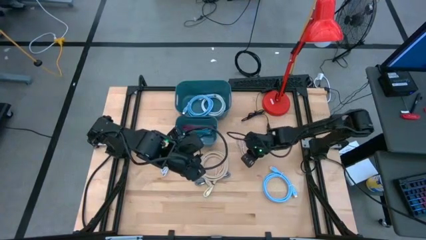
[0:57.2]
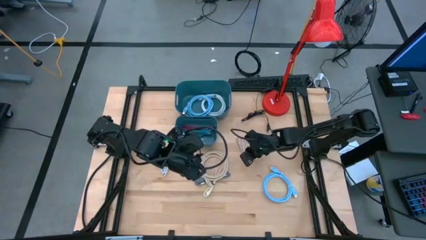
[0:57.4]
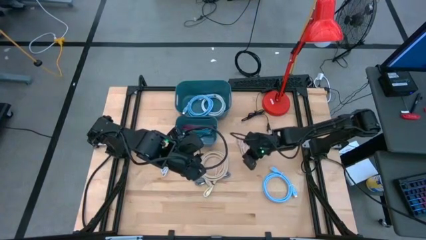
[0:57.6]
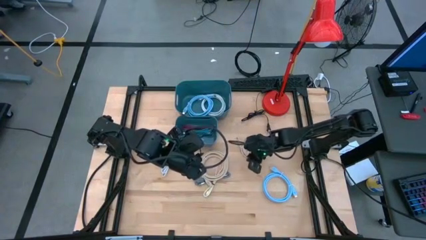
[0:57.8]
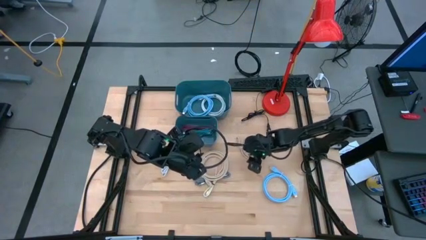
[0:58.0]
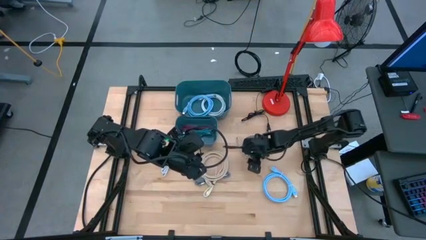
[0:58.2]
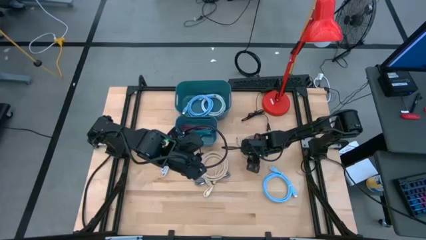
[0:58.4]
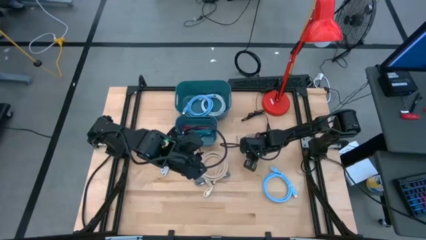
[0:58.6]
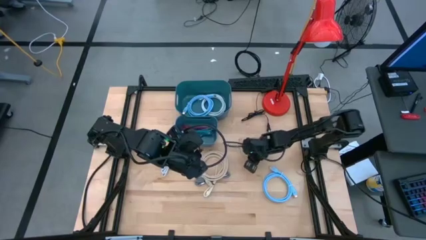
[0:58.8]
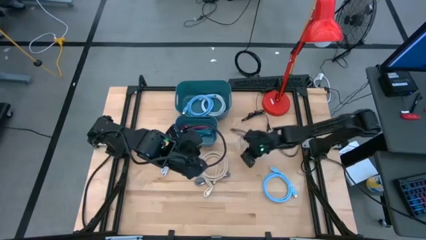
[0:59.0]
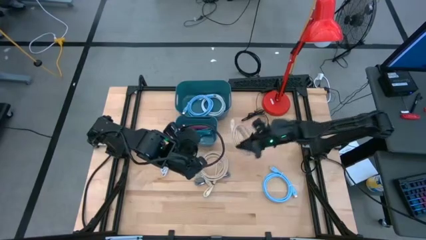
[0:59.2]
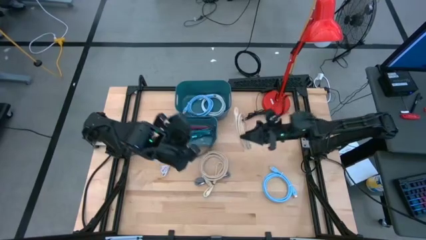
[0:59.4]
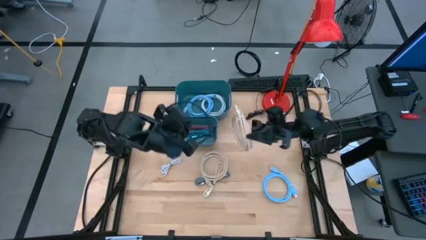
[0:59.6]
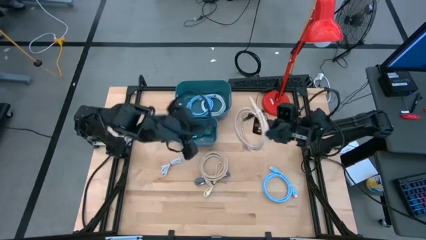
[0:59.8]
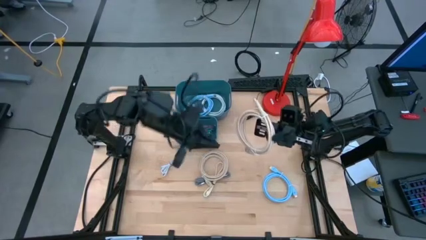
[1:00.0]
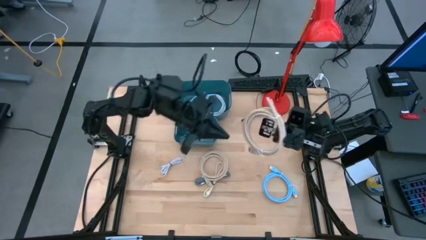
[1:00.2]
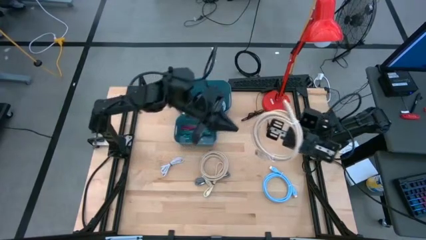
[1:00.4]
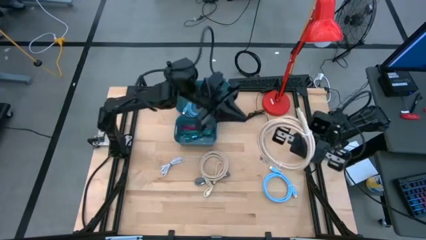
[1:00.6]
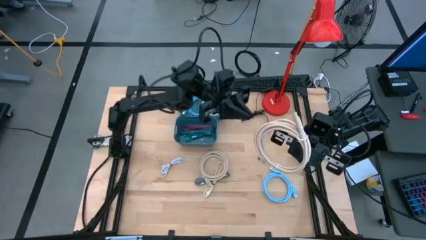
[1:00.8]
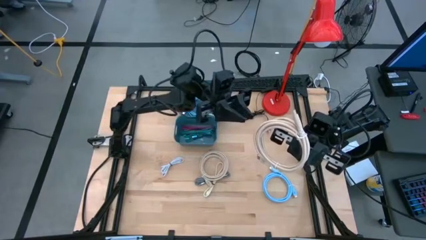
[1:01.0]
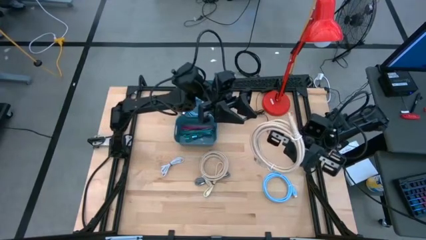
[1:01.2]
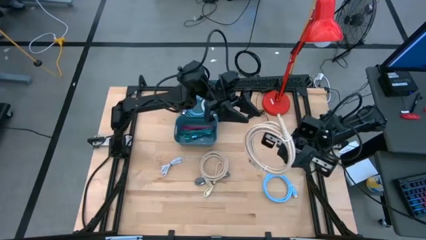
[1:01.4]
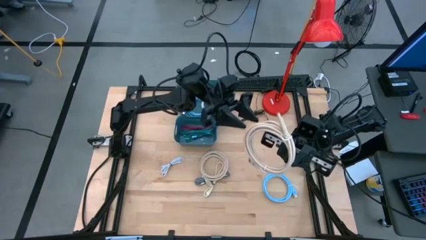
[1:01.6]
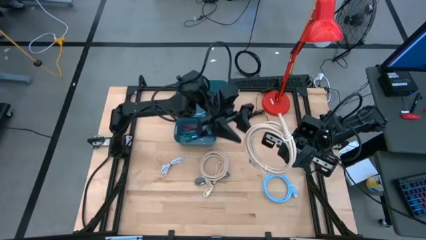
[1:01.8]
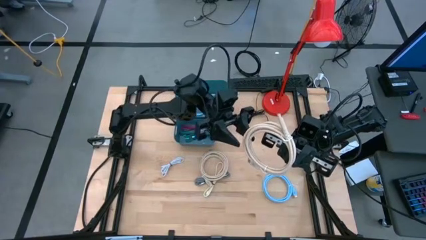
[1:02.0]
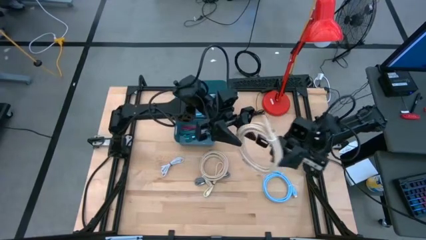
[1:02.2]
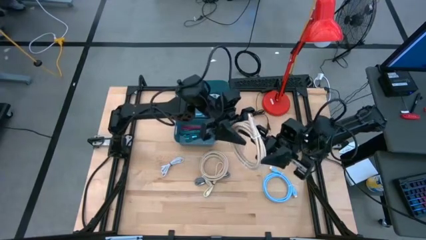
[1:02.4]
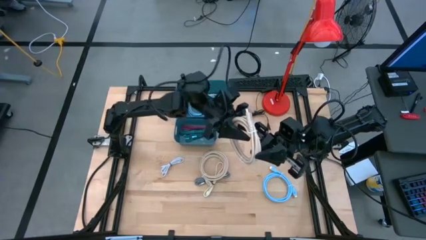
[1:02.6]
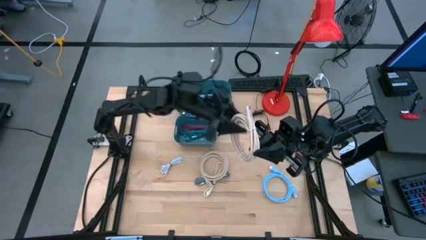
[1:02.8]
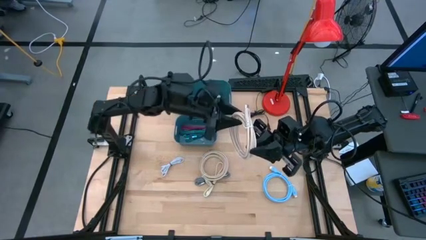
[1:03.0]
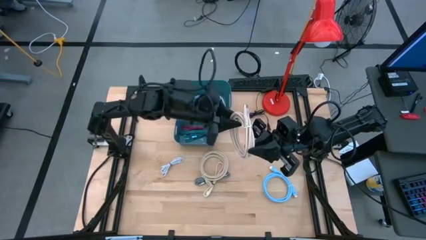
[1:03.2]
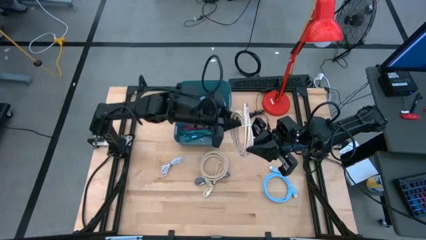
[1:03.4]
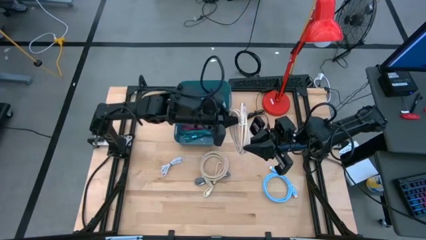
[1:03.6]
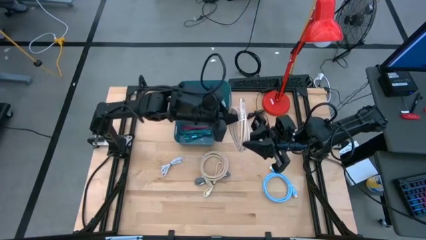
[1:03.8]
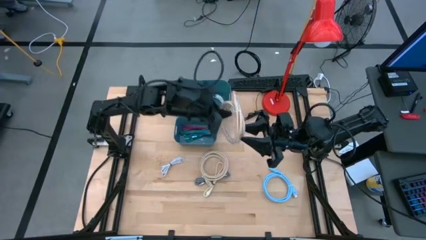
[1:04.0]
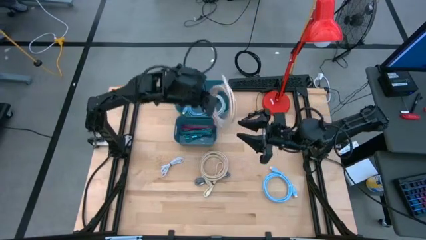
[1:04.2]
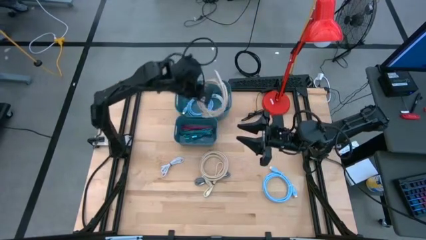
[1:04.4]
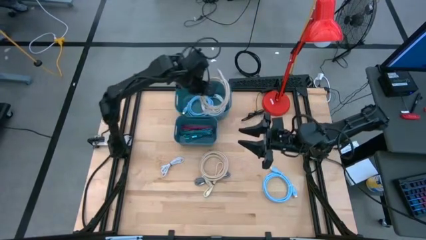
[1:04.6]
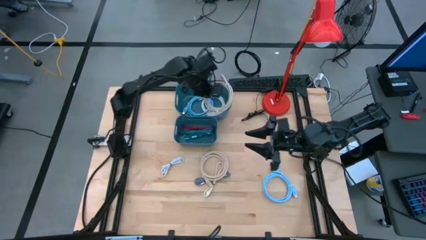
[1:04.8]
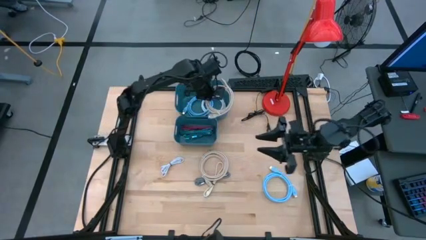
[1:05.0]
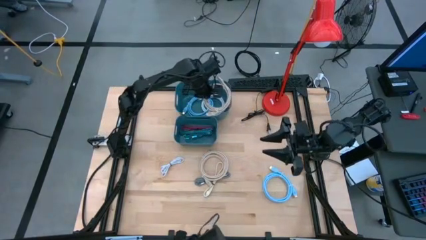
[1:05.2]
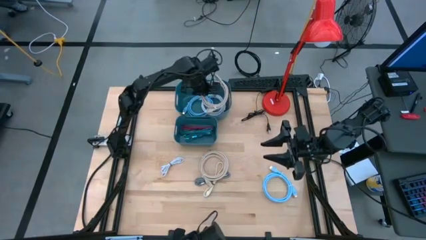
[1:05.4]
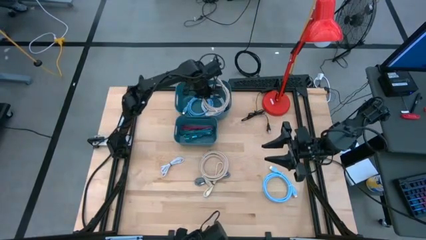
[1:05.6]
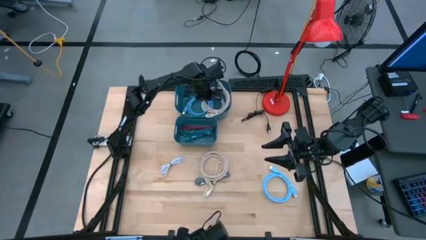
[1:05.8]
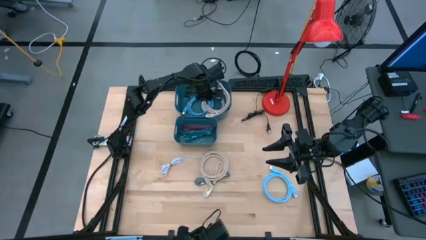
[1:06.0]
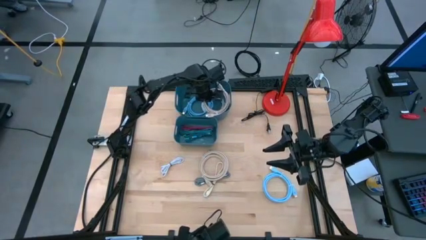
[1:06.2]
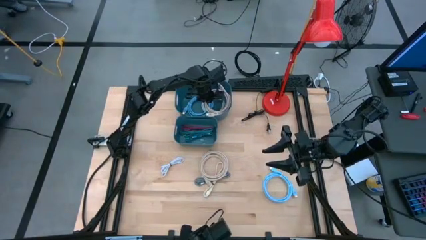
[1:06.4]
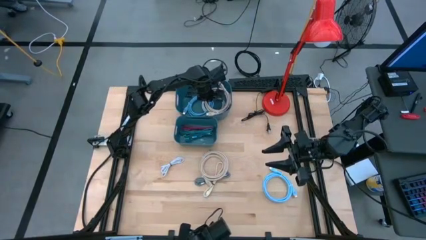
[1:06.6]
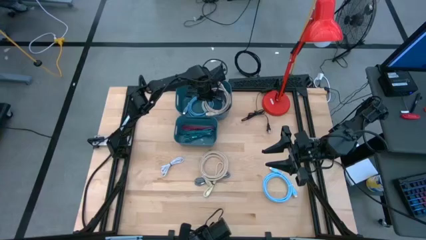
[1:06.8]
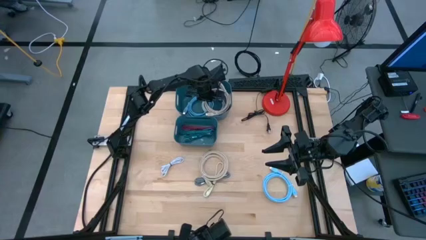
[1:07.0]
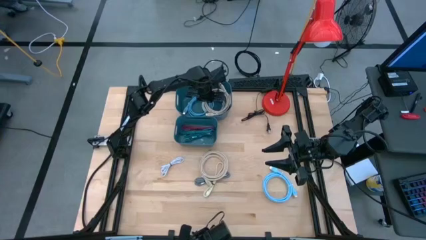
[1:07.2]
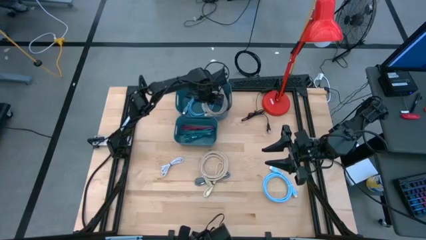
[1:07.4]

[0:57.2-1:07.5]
Task: Pick & Place USB Port
Put the top brown HDMI cable into the top blue bin

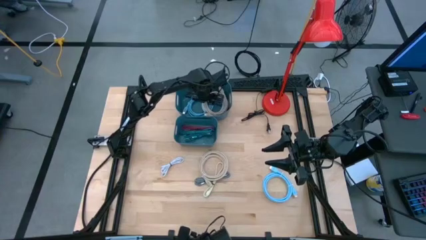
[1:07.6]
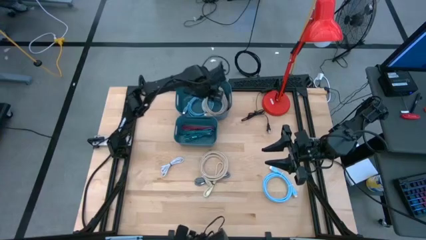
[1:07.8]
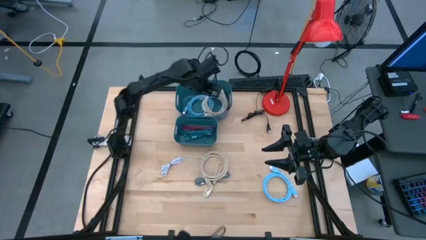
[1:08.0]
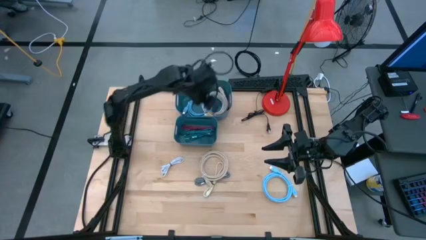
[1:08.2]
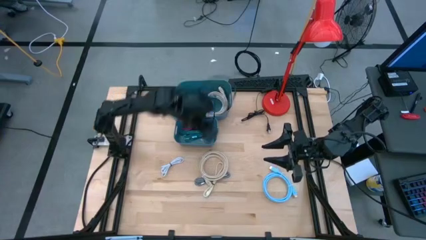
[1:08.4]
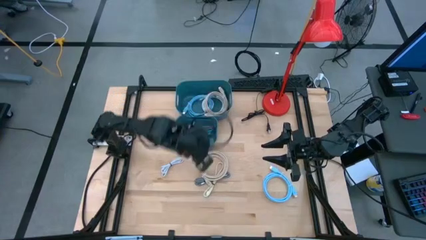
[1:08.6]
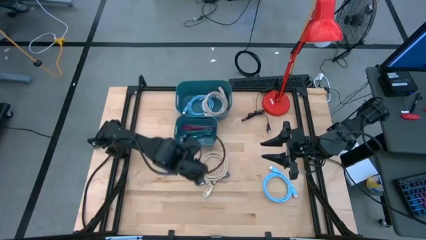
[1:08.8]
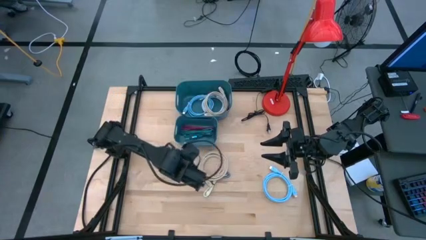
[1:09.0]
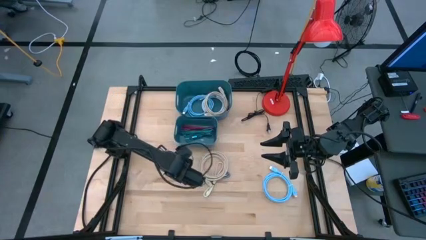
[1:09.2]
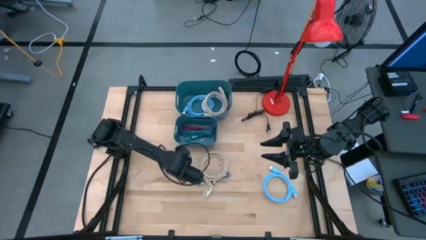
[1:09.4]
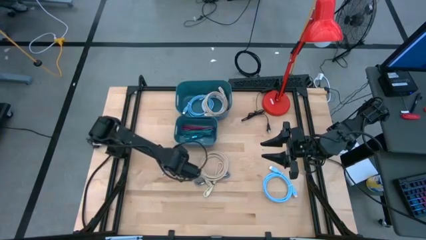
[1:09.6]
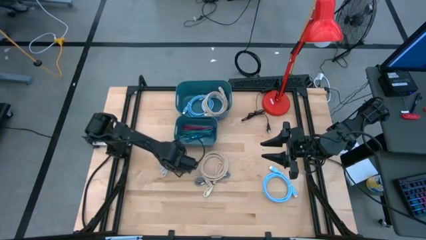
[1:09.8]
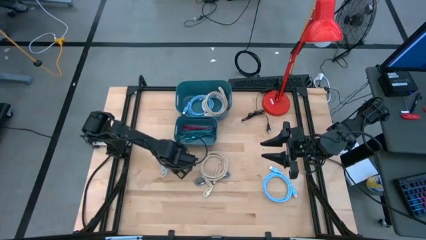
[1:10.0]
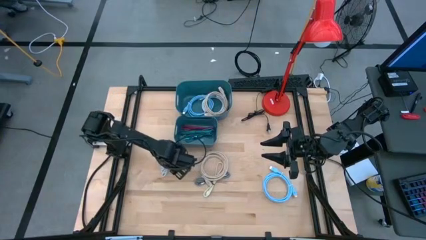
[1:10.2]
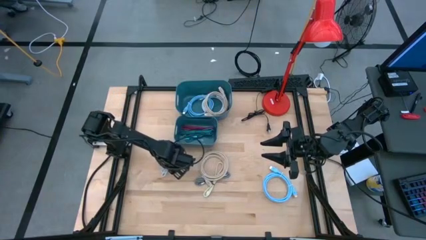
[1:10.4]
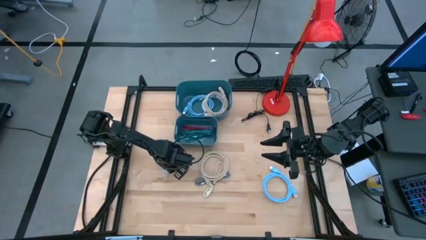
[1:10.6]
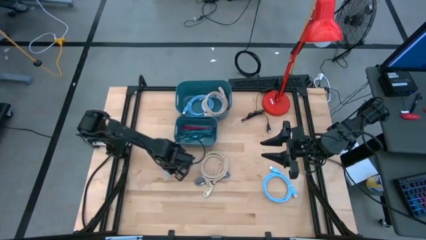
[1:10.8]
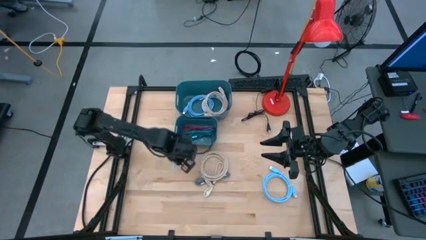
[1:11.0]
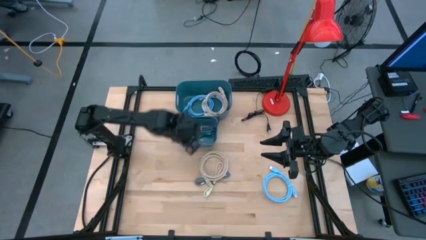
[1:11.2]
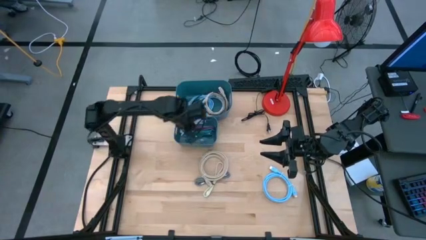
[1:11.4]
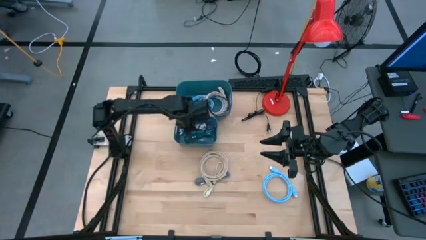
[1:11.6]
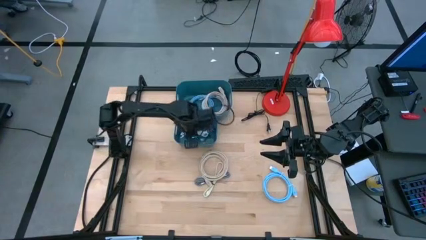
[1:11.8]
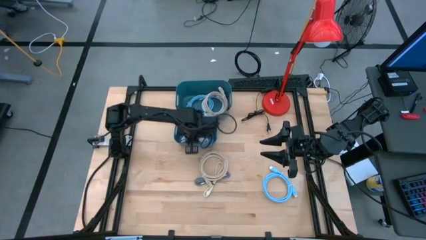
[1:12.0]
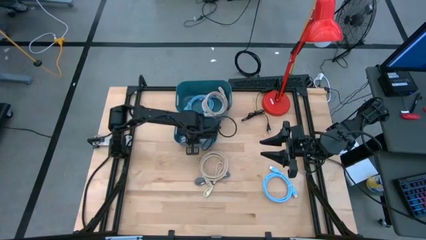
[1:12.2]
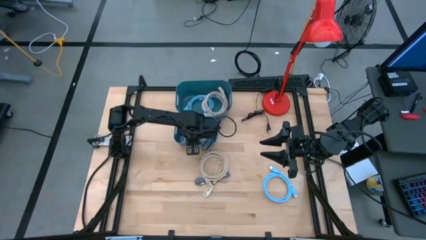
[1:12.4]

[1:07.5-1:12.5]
Put the white charger cable into the bottom blue bin
